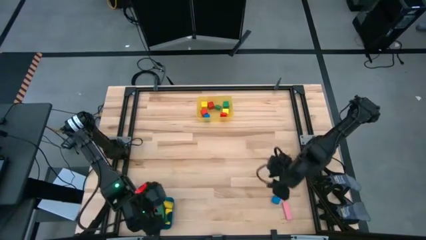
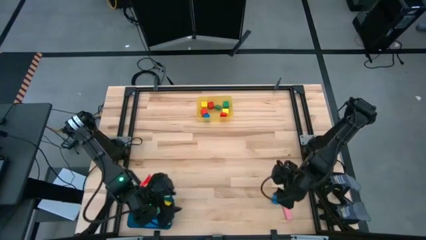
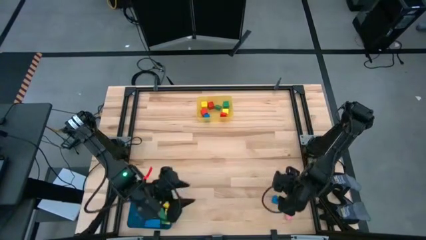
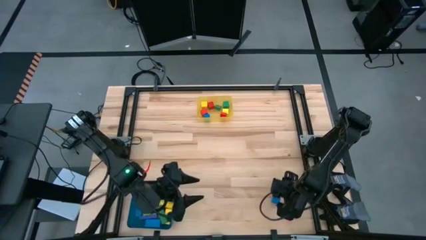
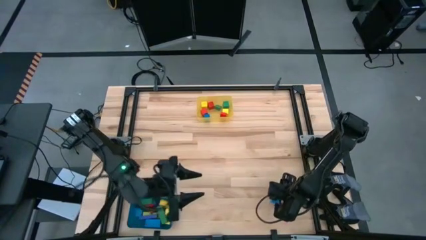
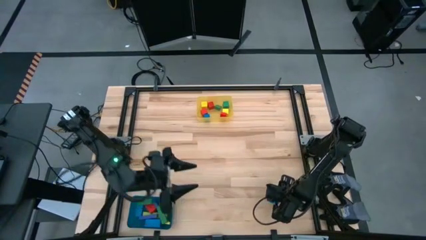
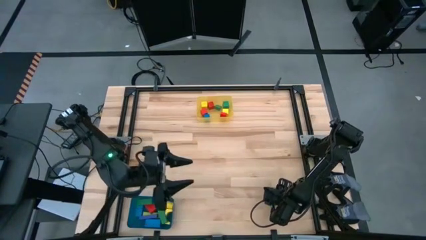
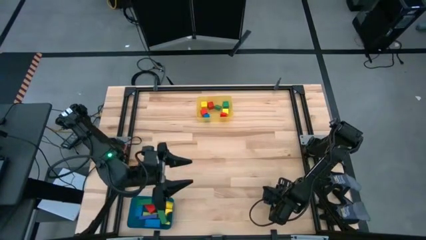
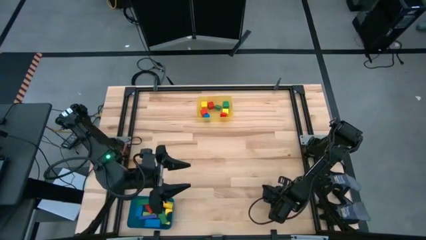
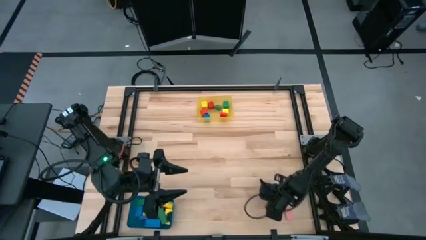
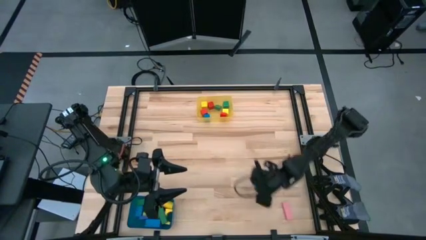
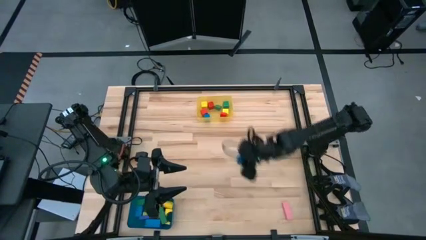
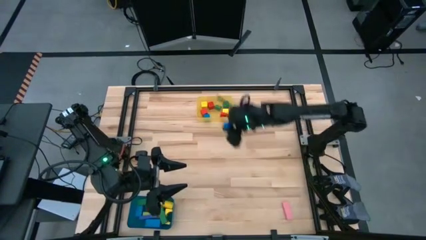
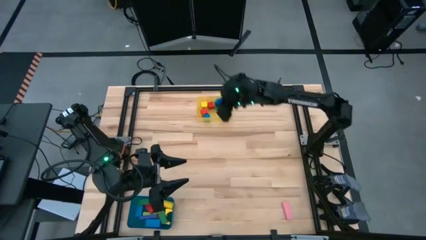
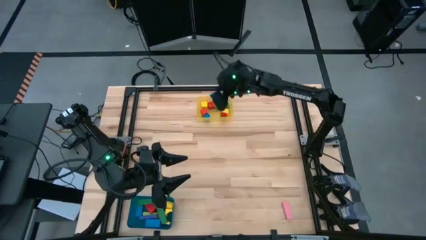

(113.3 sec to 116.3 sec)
Task: Sort blocks by size
Put the blue square block into the yellow bin

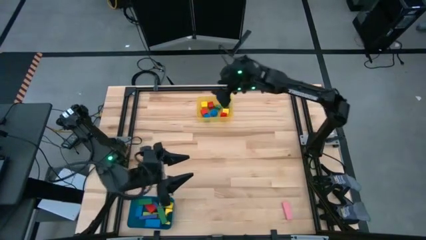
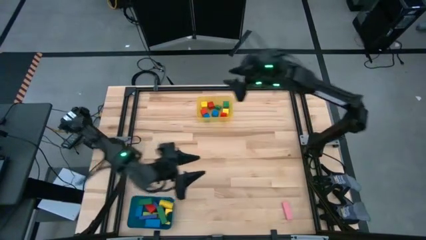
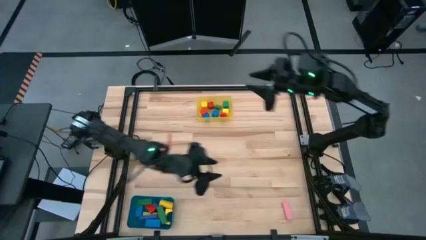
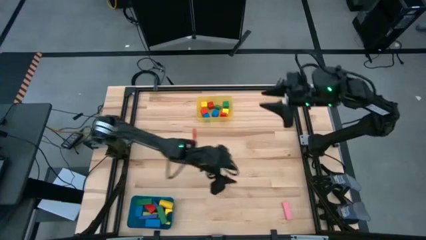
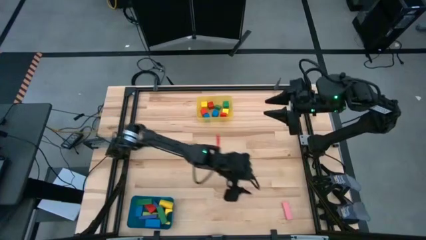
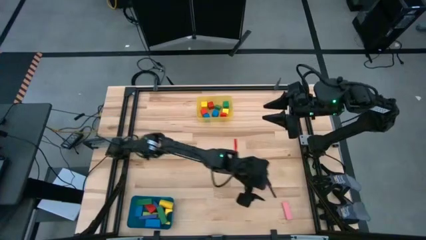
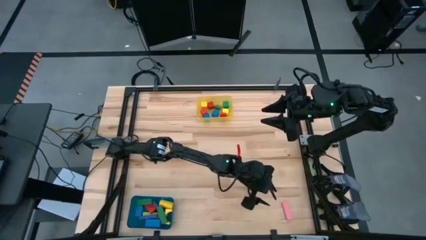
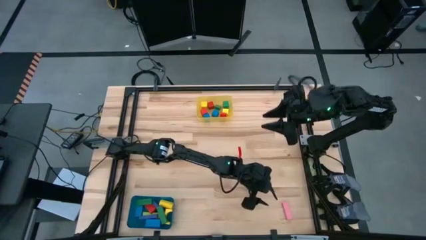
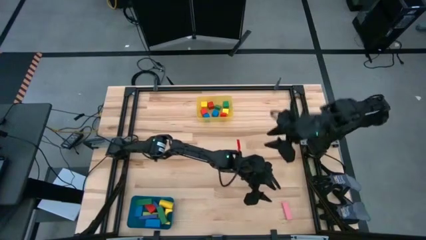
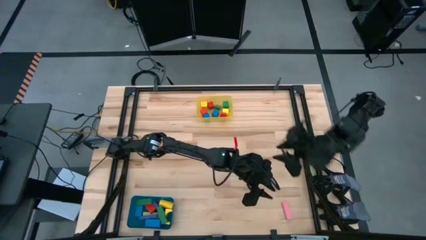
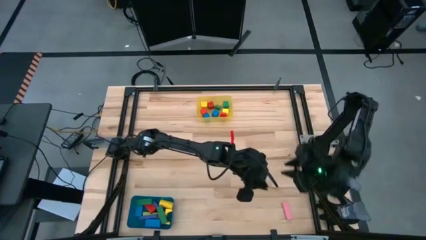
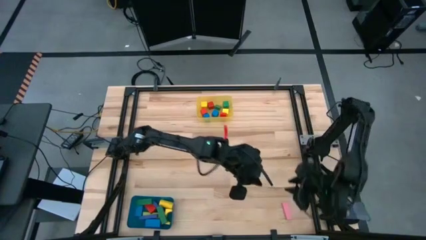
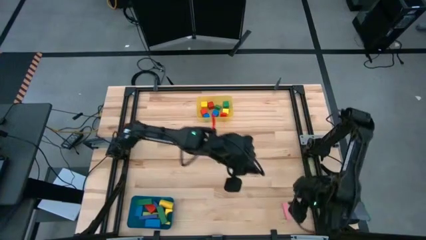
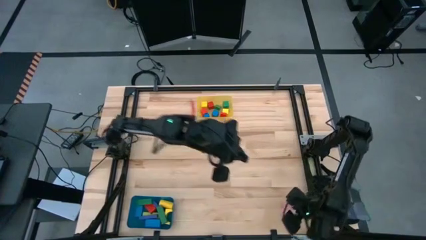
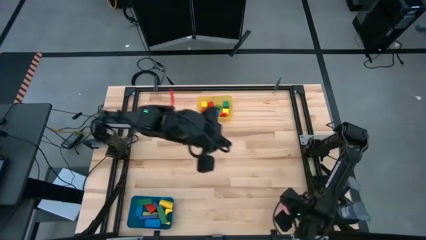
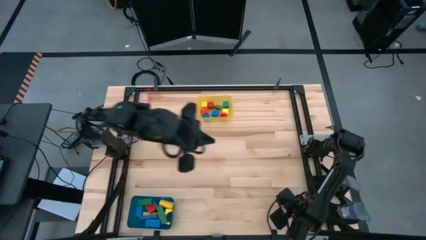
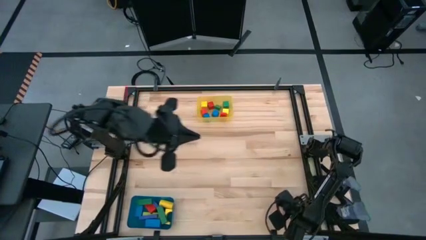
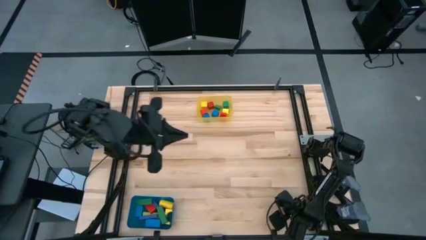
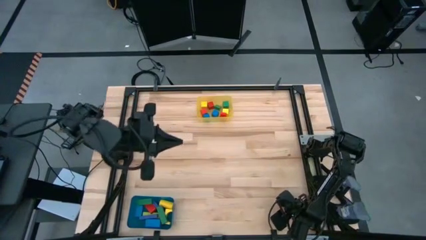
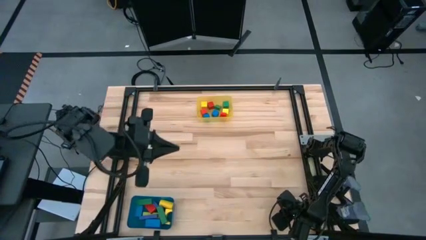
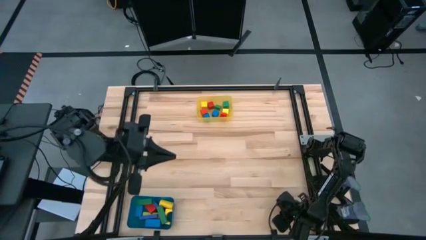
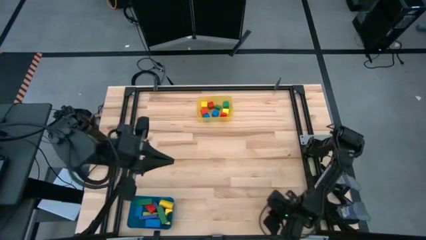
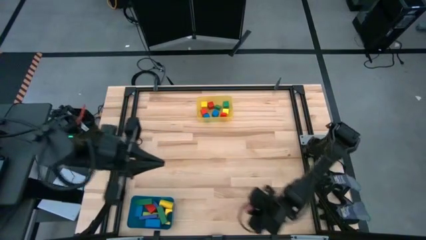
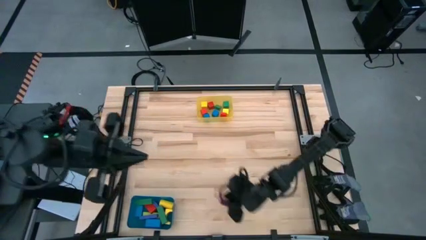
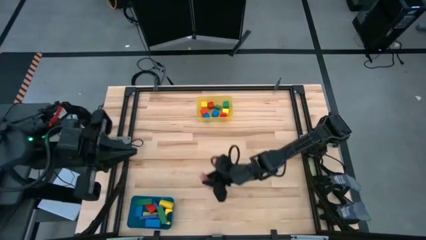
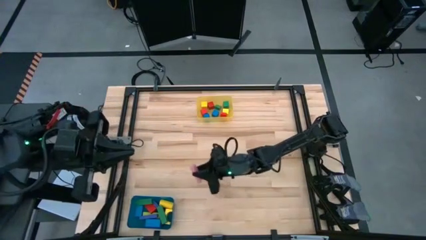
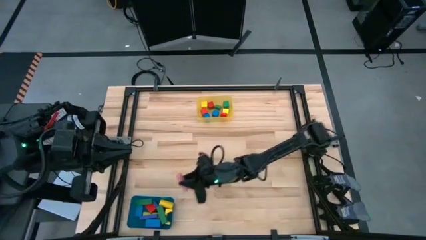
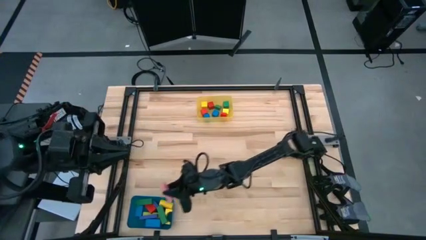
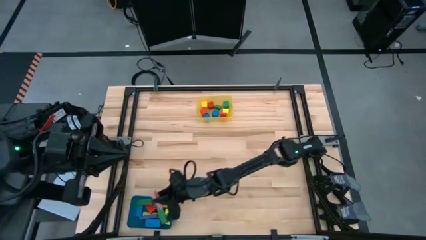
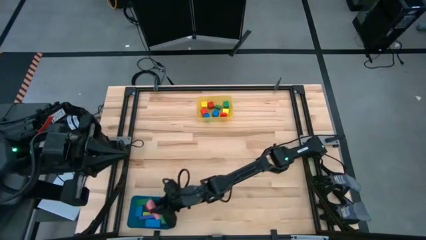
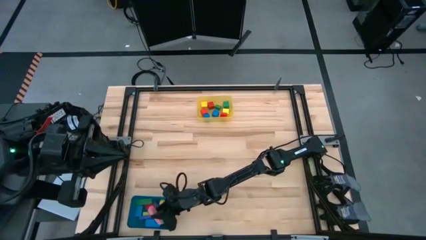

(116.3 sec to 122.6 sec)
Put the pink rectangular block into the blue bin

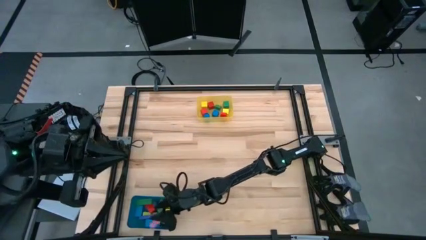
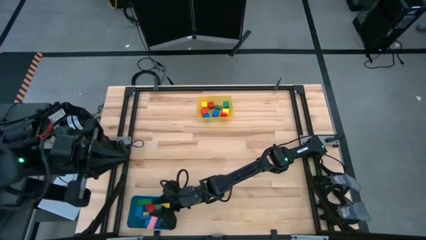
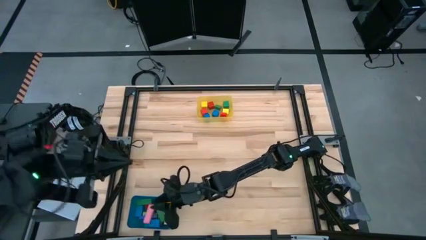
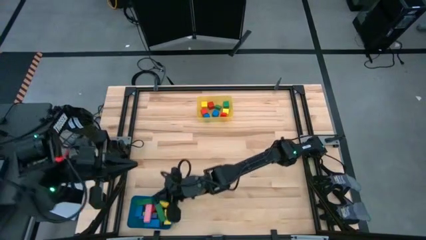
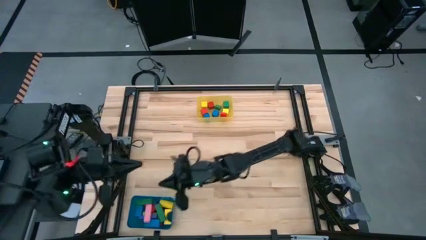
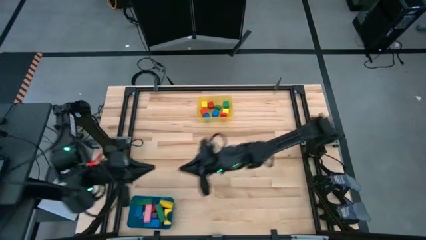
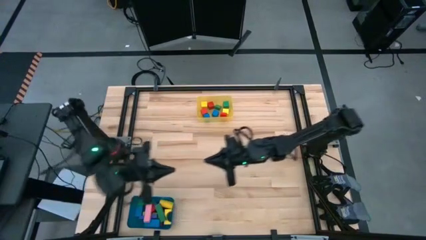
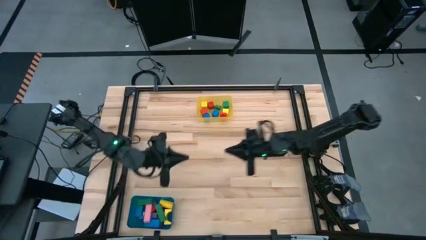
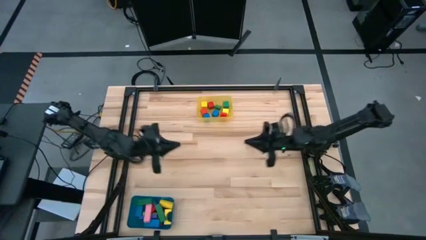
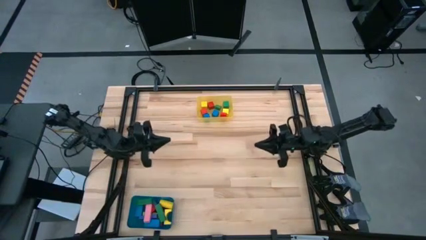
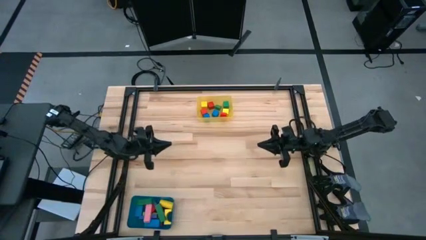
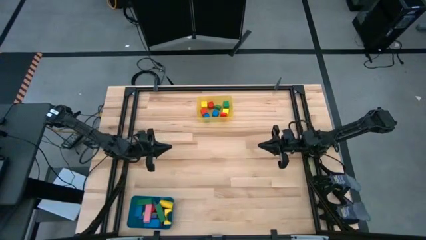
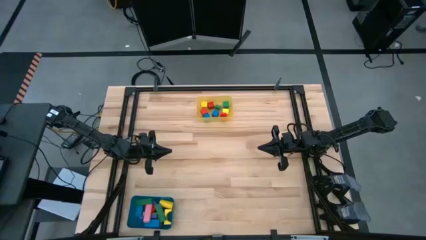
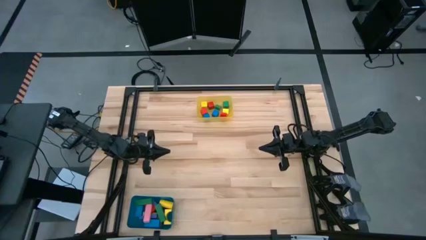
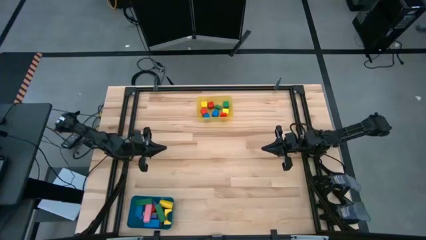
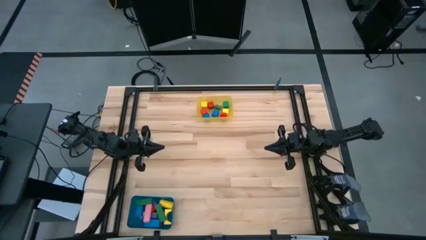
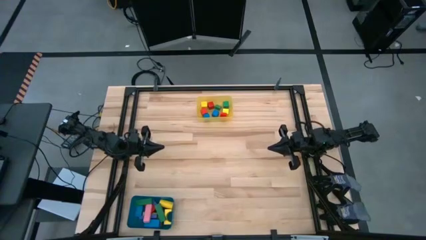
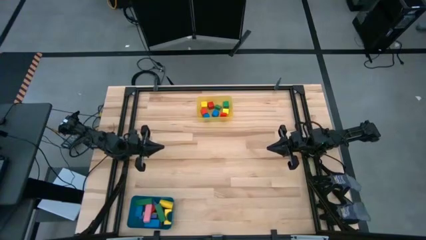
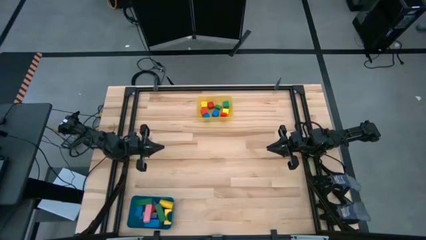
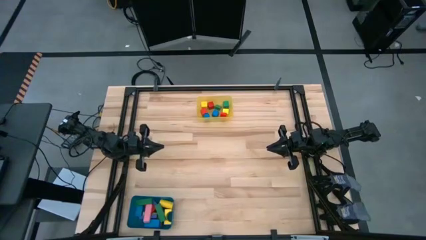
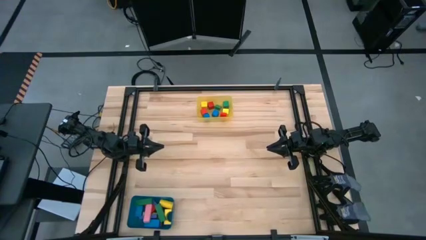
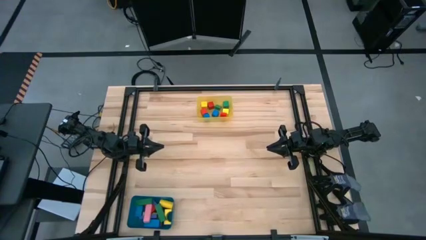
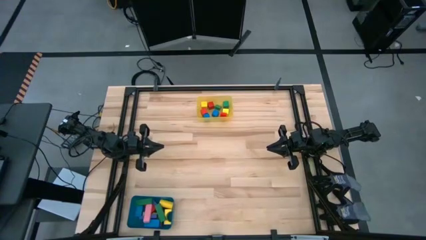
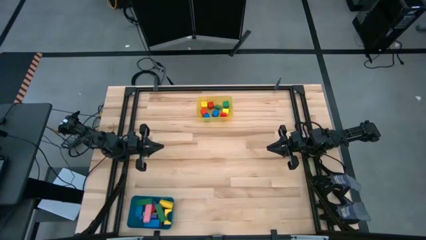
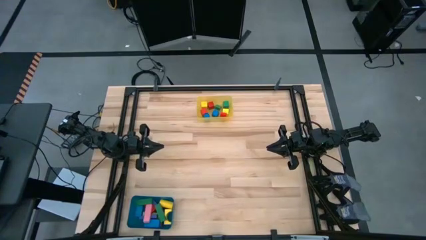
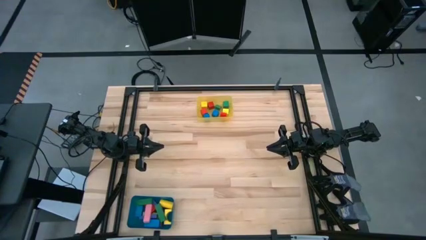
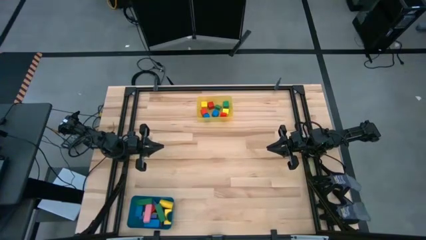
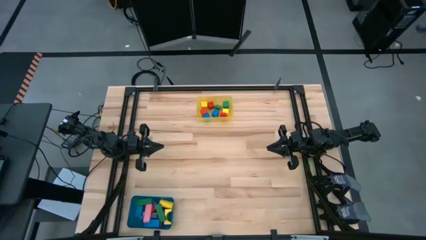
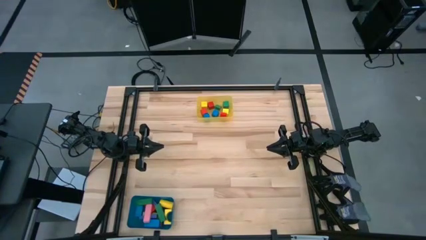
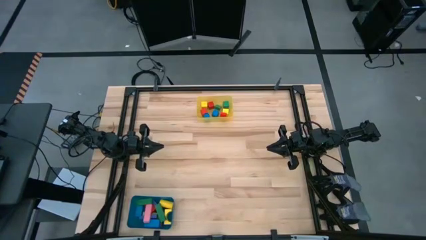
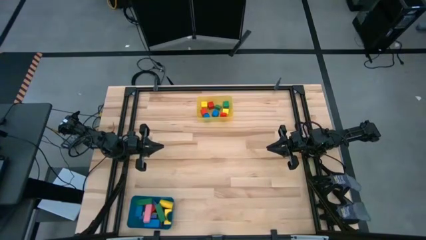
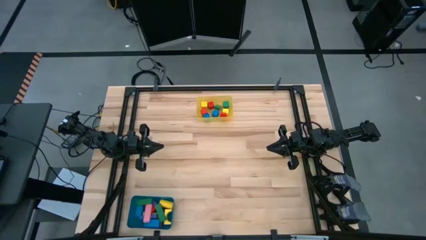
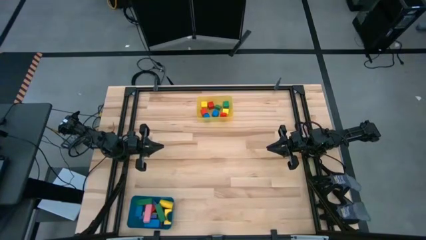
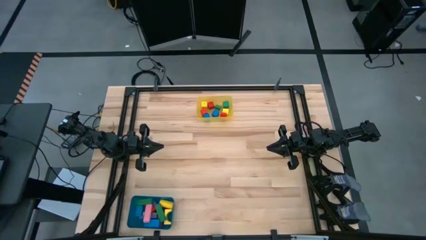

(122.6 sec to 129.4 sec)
Return to Home Position
